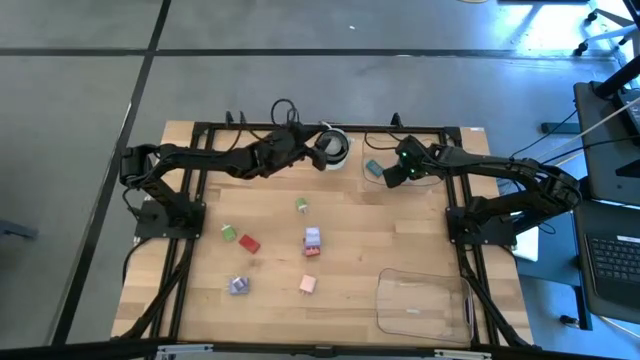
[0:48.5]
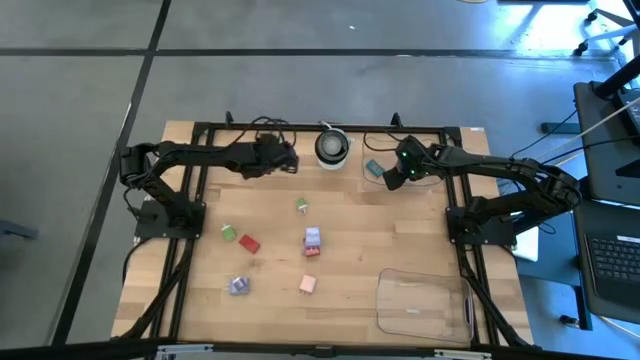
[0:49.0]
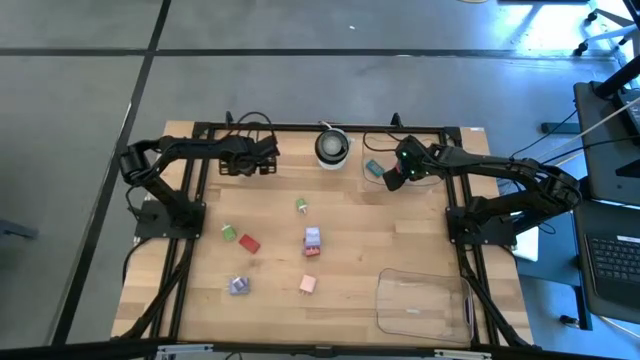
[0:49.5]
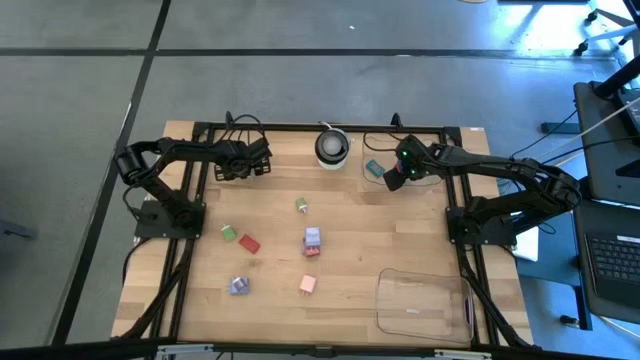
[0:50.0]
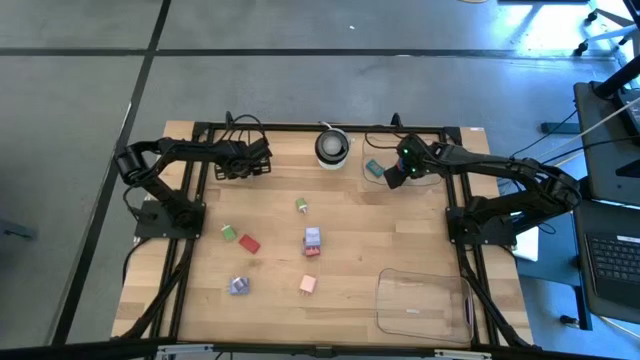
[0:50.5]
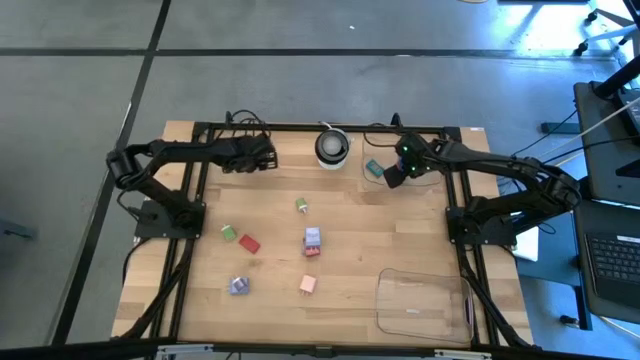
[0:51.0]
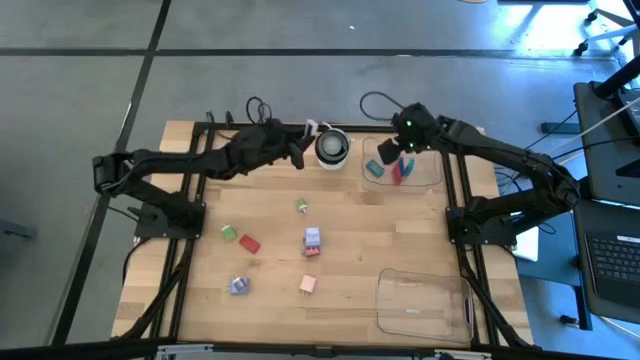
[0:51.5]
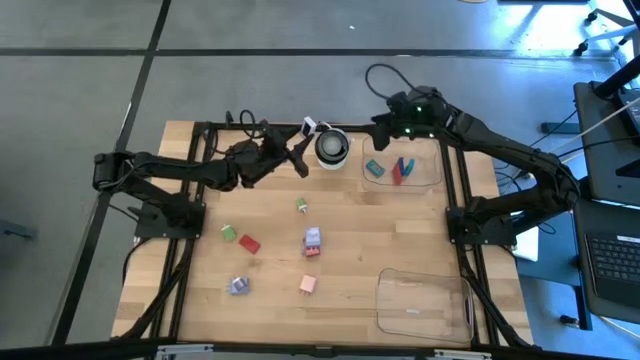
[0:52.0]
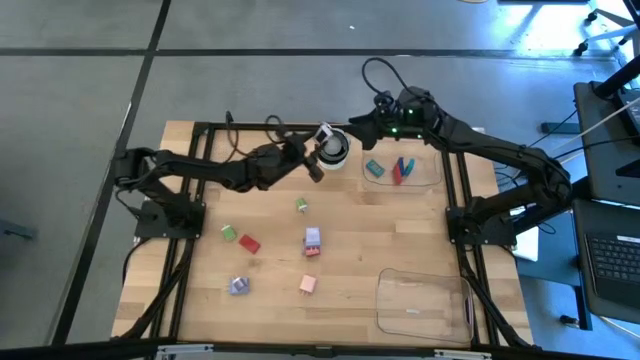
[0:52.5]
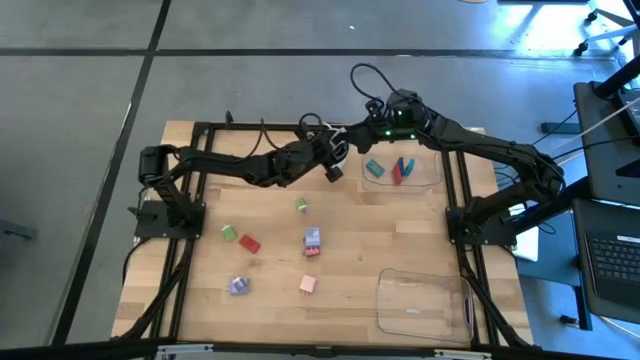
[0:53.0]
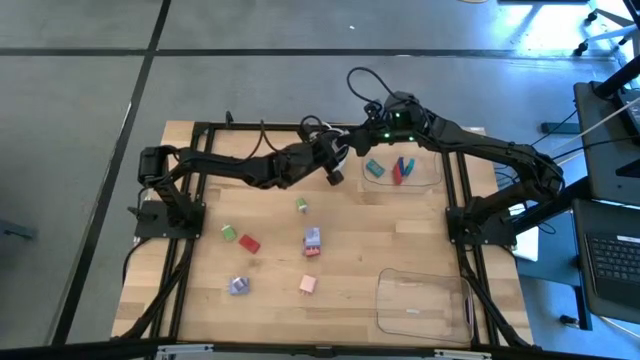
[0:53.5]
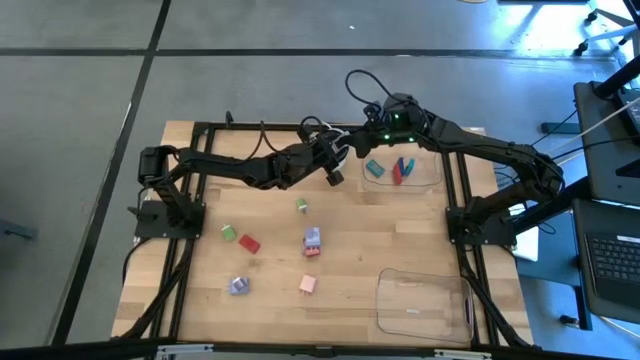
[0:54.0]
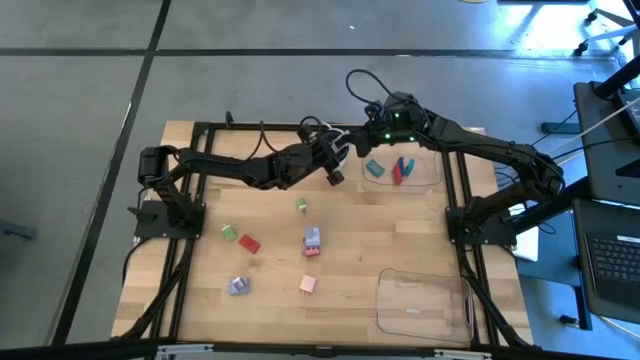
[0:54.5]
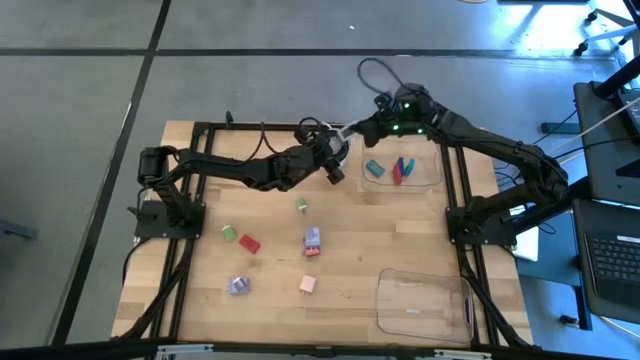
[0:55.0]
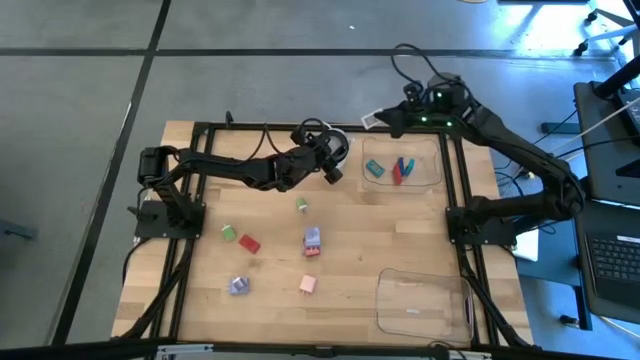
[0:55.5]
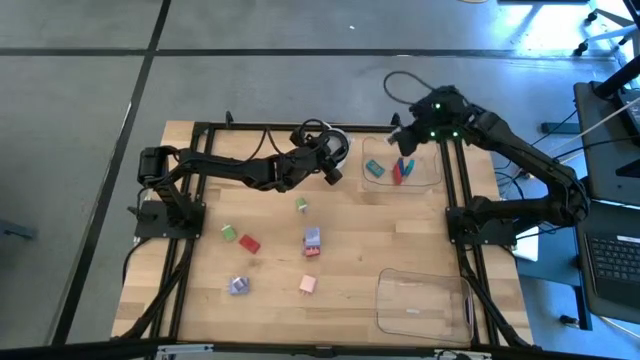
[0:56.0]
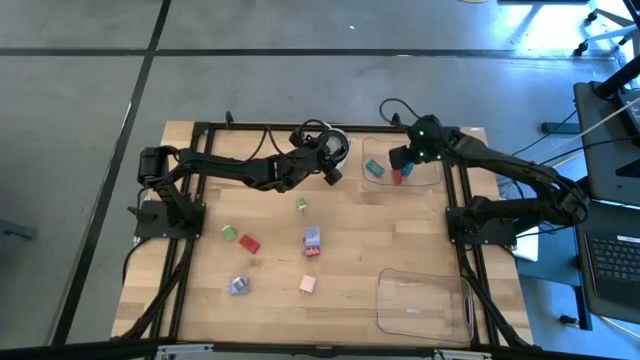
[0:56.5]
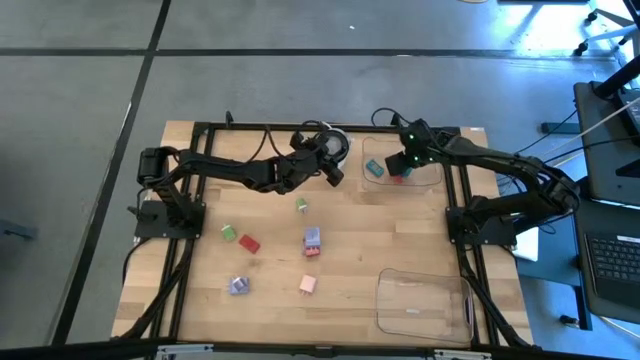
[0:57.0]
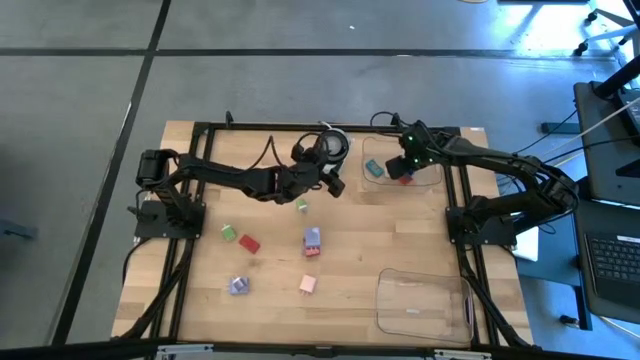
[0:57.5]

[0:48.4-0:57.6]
Task: Pick & Place Office items
Put the white digital timer into the top transparent bin

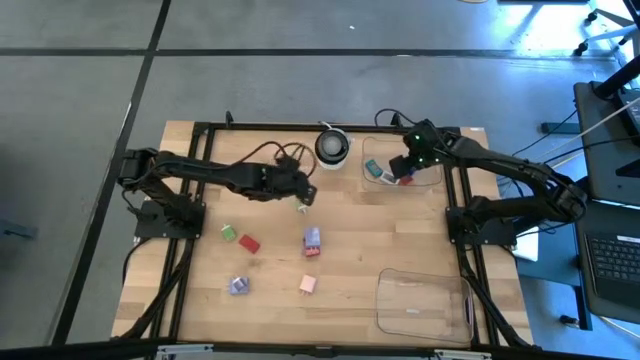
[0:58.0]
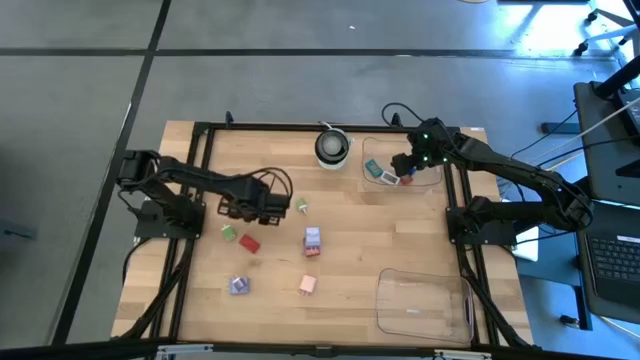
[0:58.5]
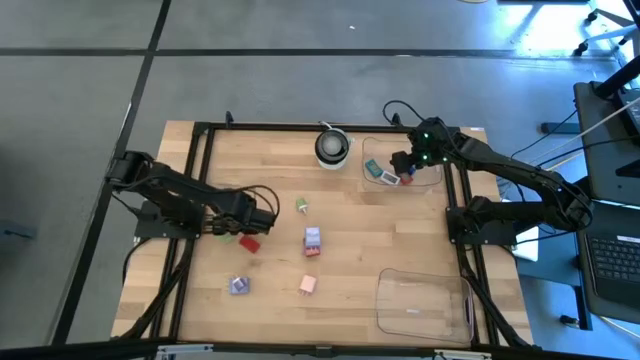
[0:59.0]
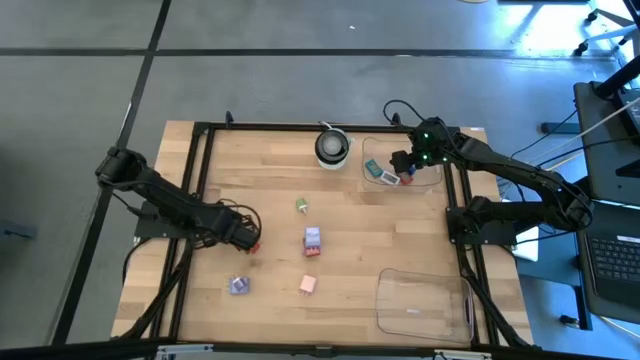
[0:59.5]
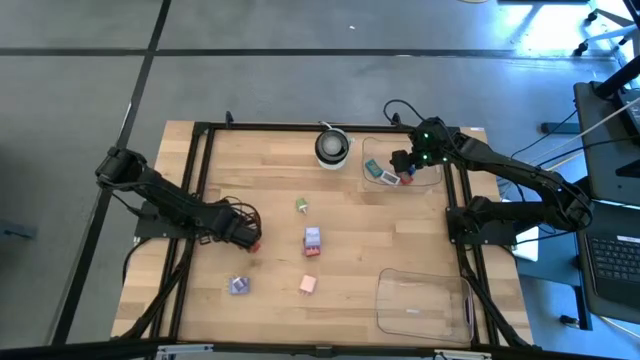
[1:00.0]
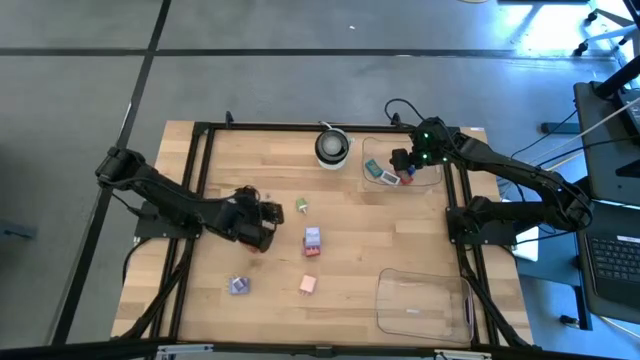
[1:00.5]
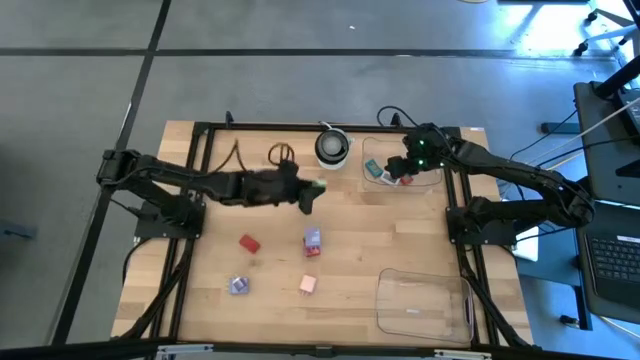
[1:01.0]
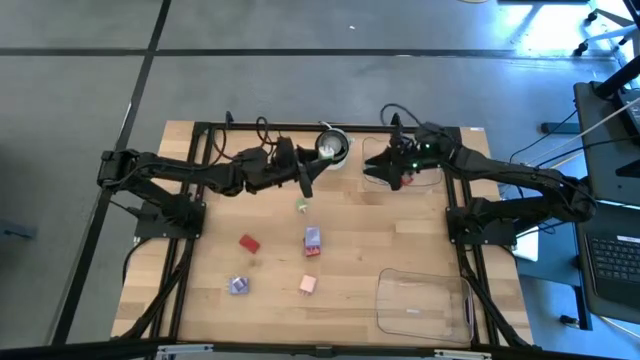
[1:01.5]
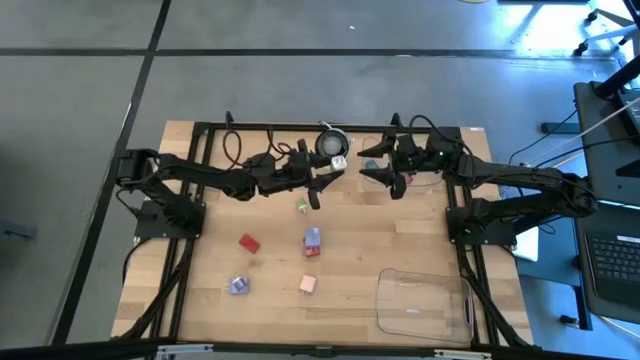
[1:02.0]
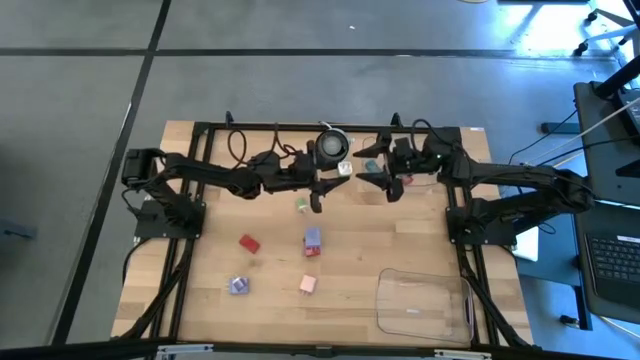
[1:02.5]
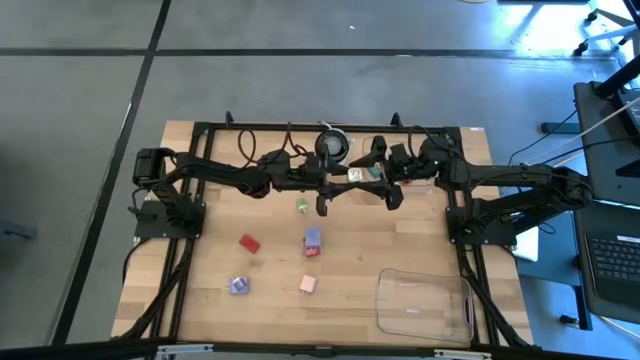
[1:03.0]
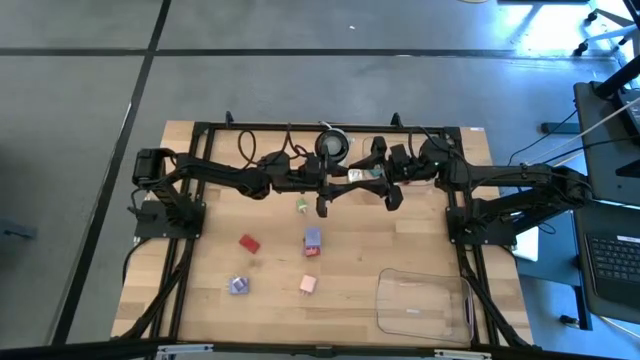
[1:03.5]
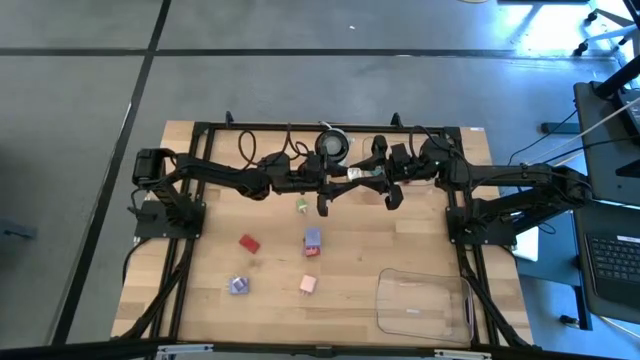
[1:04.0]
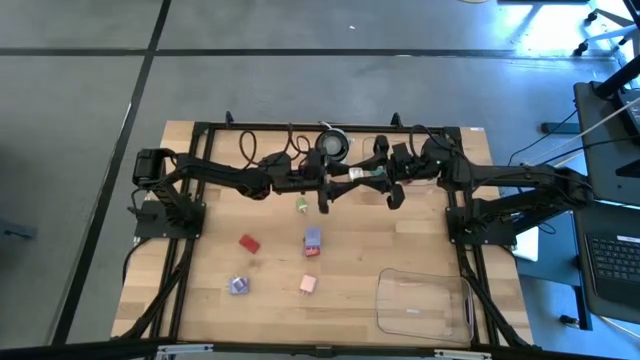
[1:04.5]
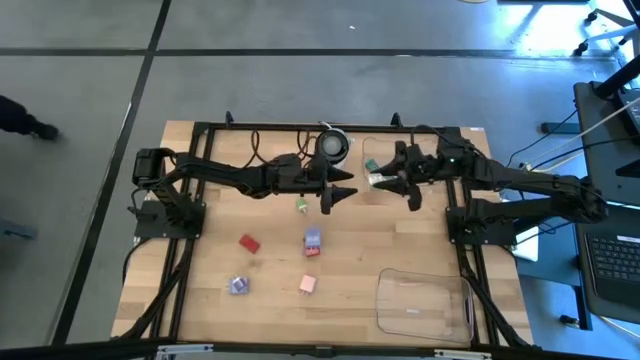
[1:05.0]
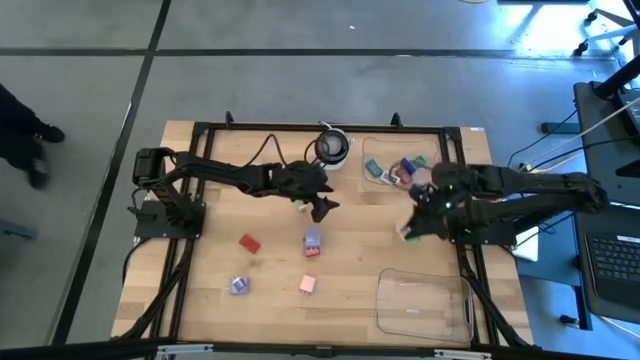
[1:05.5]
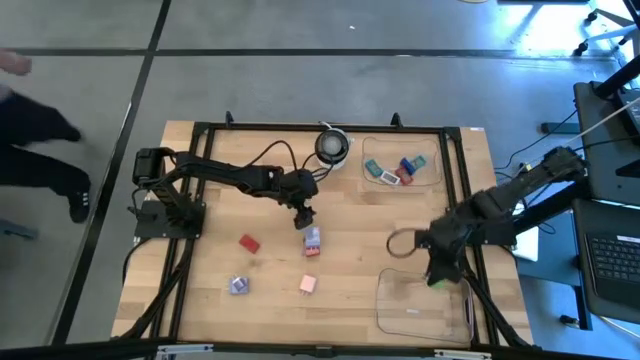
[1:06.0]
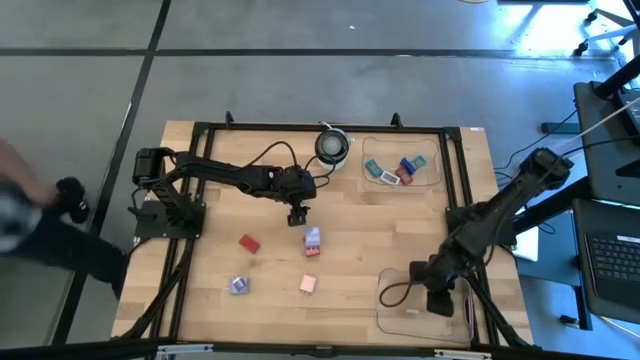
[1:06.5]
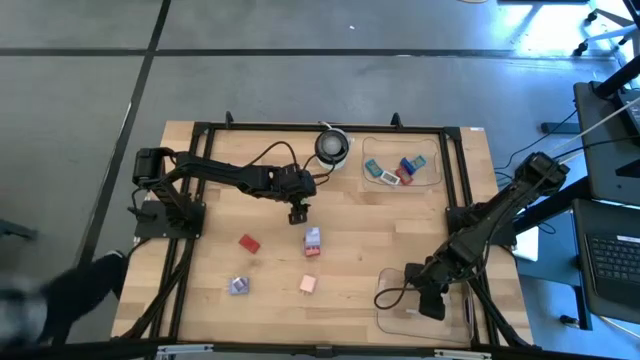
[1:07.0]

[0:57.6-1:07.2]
Put the bottom green charger adapter into the bottom transparent bin

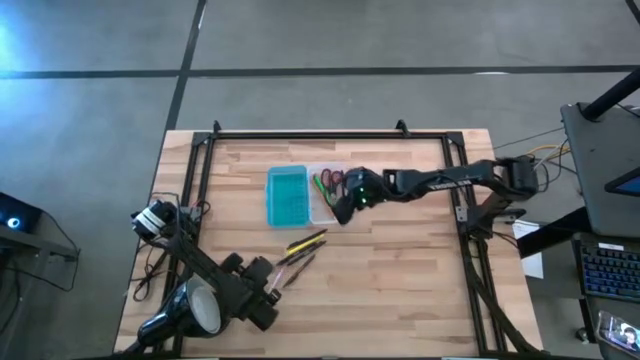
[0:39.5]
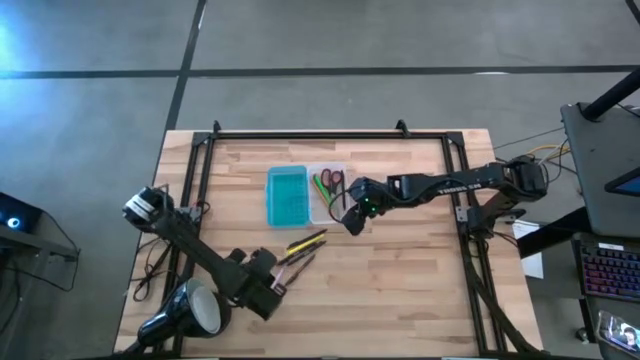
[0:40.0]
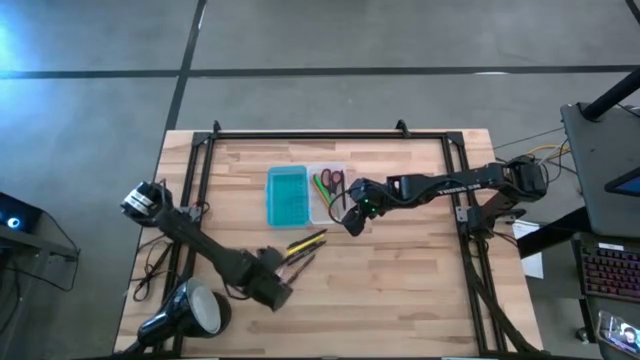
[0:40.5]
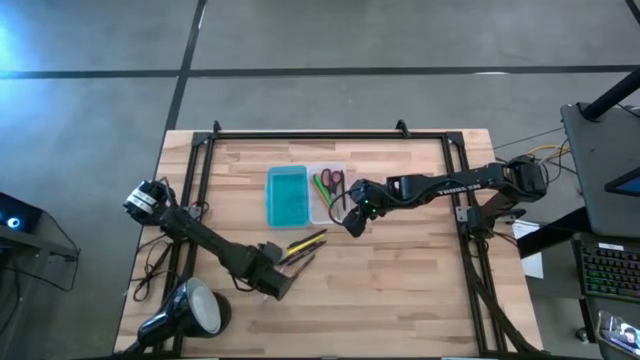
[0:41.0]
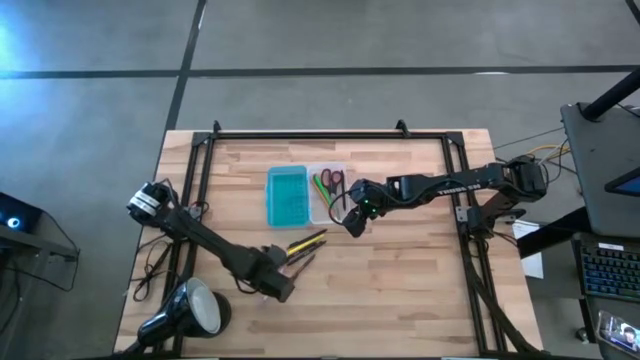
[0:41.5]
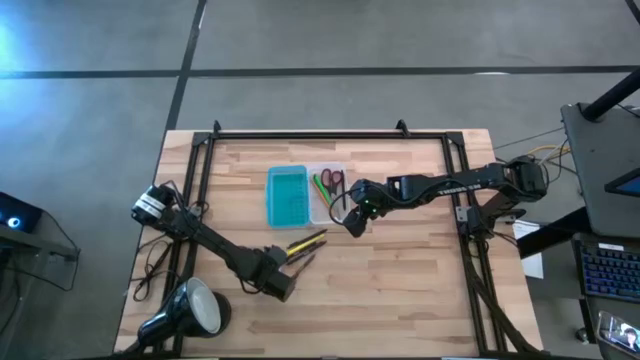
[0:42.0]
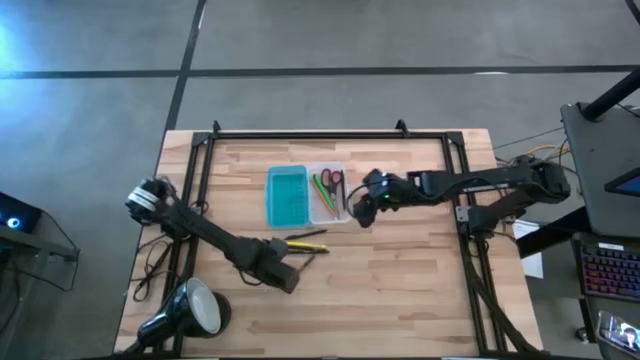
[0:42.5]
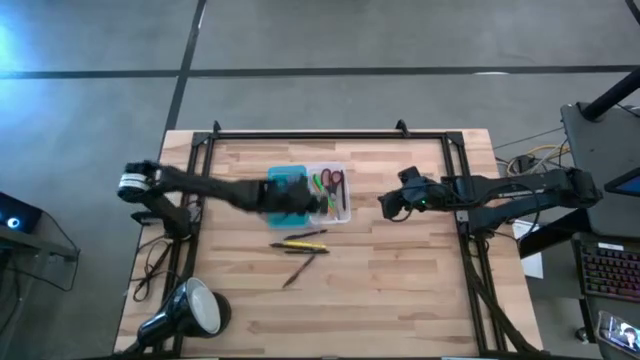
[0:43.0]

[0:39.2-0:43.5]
Task: Pick & place school supplies into a supply box
Put the purple pen into the blue supply box
